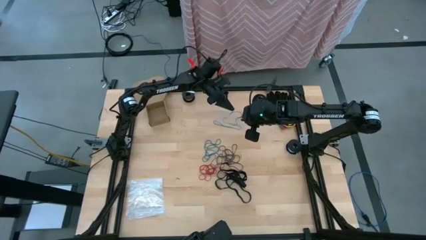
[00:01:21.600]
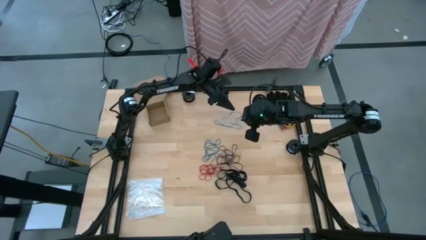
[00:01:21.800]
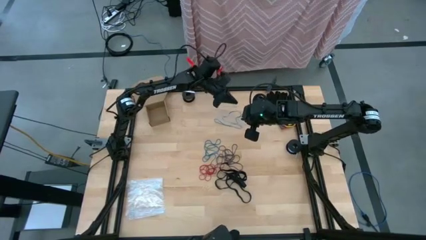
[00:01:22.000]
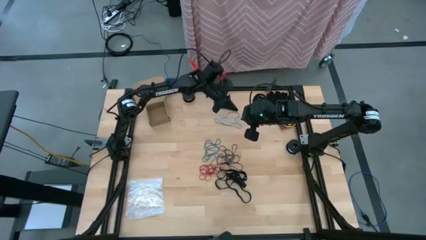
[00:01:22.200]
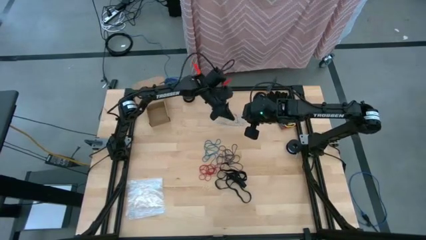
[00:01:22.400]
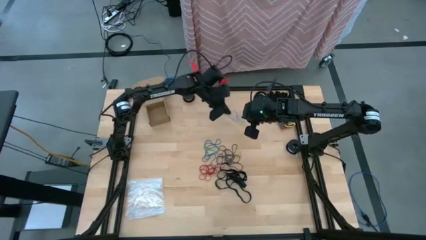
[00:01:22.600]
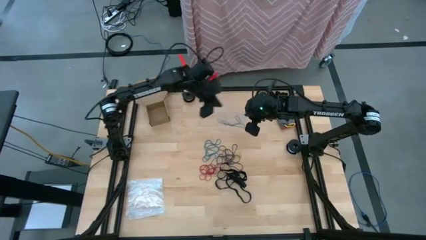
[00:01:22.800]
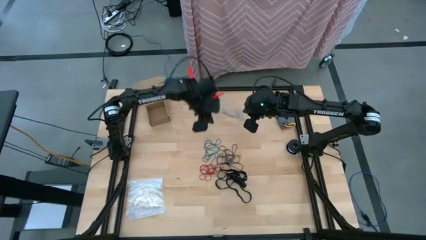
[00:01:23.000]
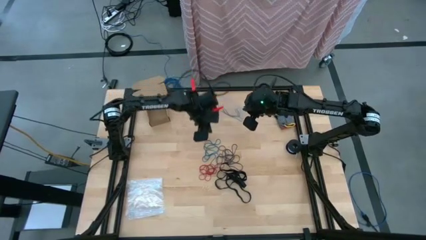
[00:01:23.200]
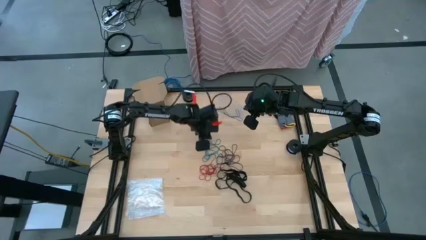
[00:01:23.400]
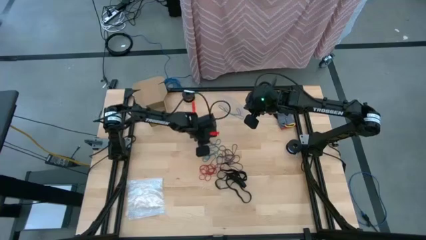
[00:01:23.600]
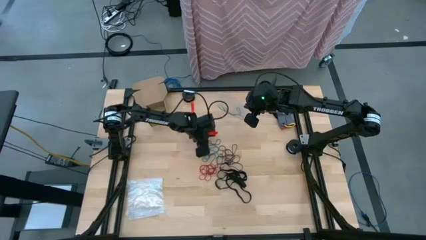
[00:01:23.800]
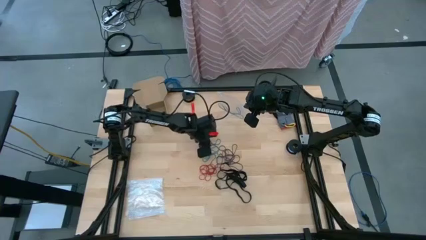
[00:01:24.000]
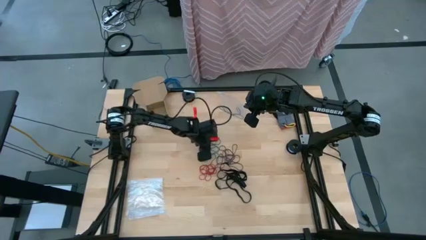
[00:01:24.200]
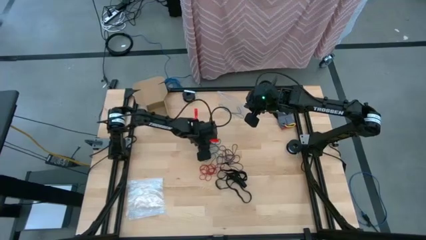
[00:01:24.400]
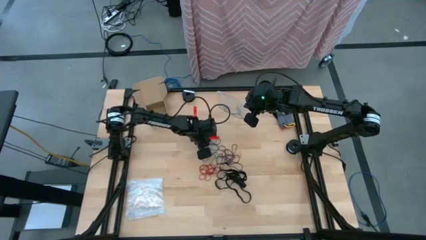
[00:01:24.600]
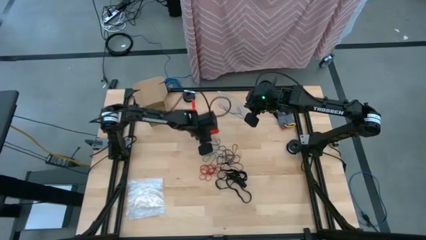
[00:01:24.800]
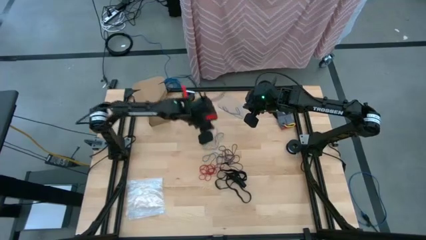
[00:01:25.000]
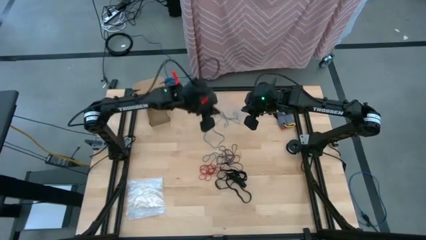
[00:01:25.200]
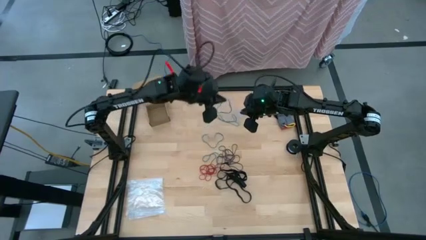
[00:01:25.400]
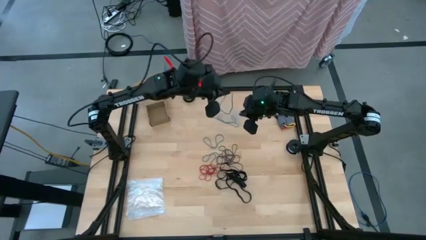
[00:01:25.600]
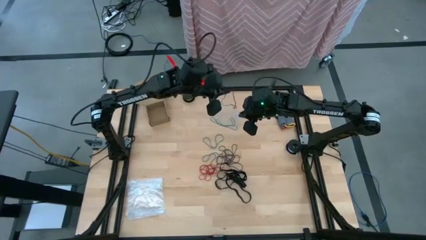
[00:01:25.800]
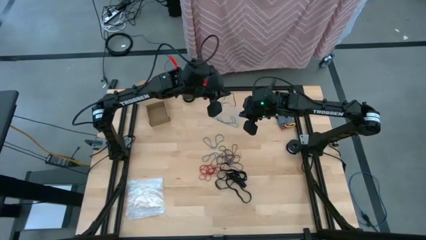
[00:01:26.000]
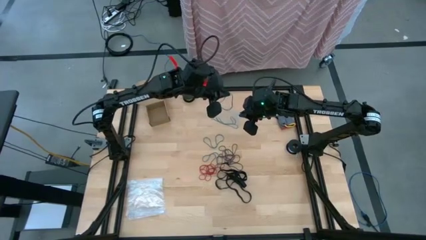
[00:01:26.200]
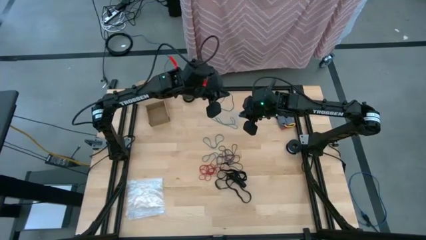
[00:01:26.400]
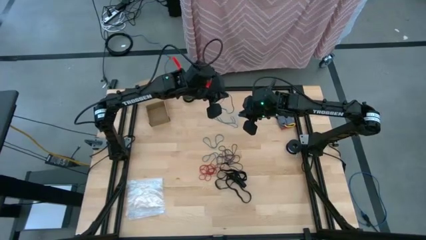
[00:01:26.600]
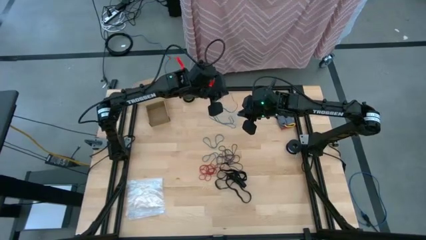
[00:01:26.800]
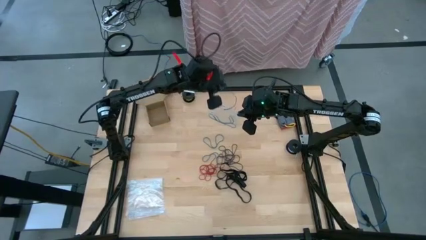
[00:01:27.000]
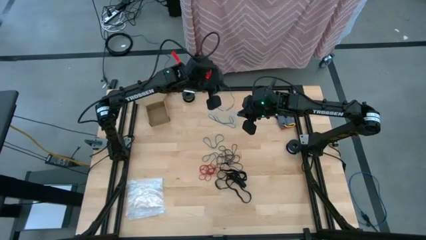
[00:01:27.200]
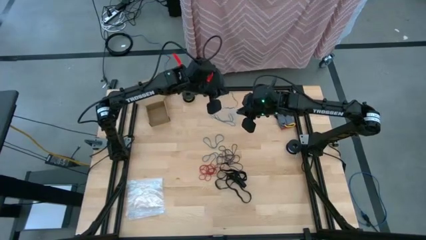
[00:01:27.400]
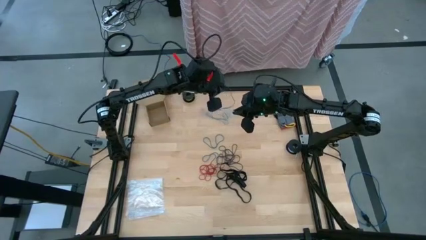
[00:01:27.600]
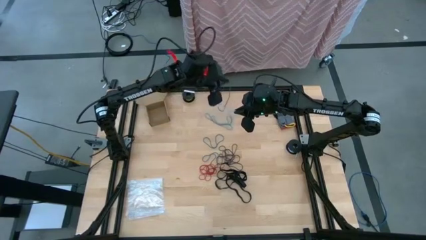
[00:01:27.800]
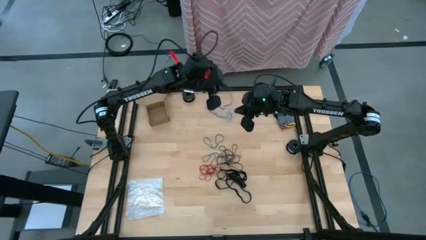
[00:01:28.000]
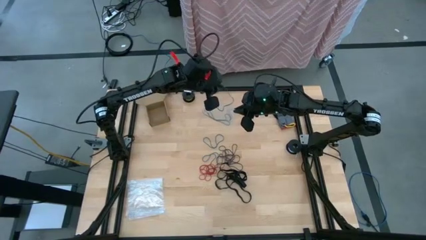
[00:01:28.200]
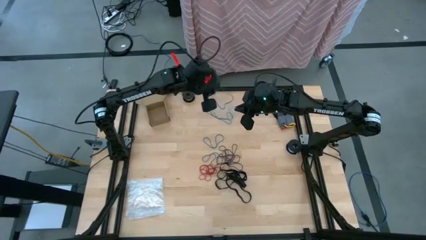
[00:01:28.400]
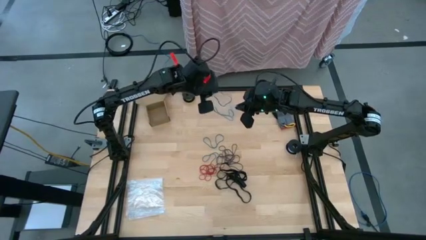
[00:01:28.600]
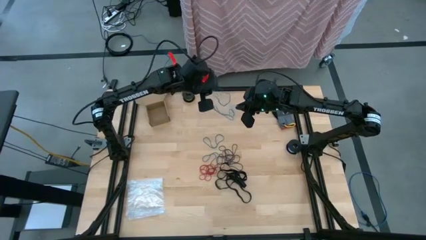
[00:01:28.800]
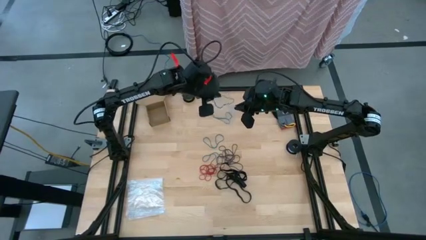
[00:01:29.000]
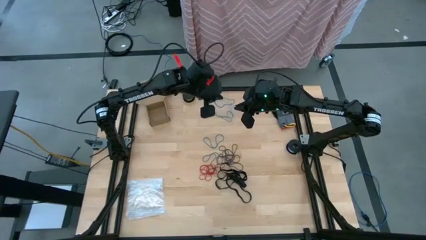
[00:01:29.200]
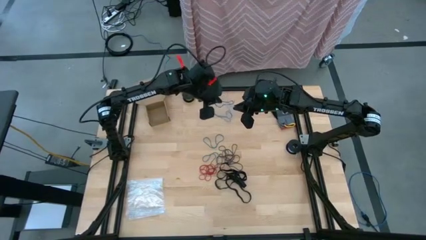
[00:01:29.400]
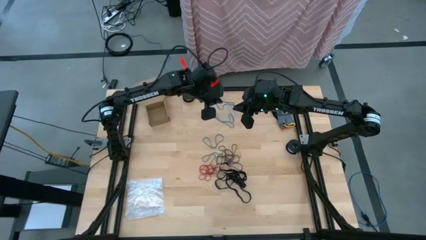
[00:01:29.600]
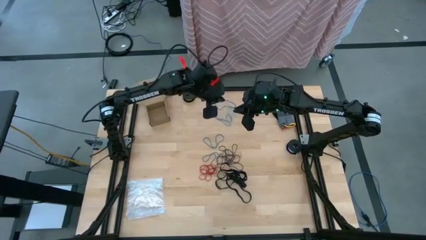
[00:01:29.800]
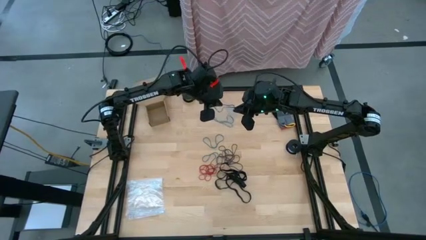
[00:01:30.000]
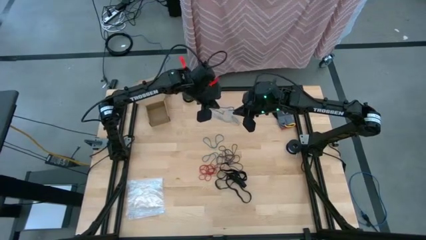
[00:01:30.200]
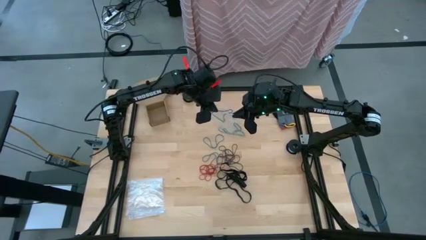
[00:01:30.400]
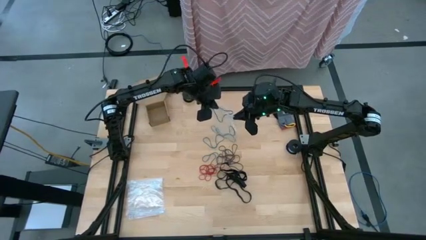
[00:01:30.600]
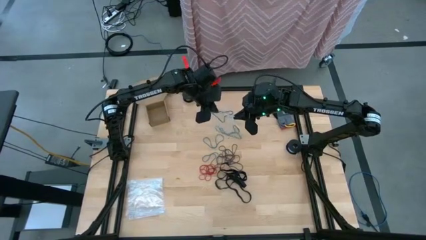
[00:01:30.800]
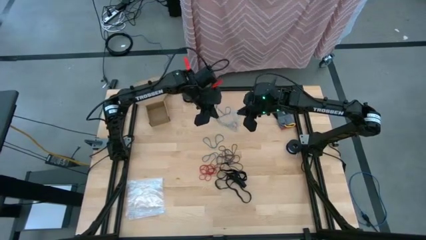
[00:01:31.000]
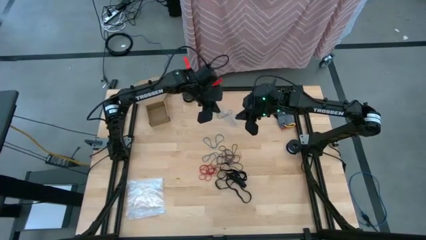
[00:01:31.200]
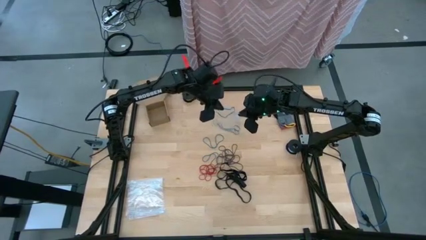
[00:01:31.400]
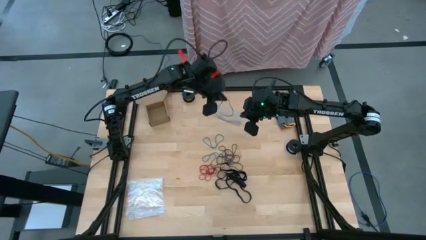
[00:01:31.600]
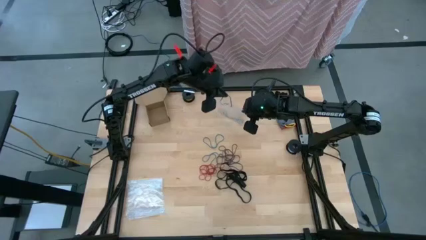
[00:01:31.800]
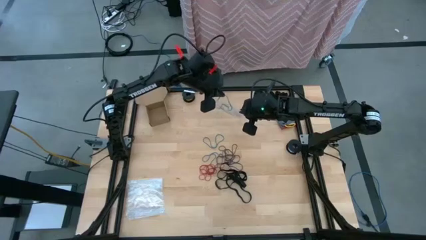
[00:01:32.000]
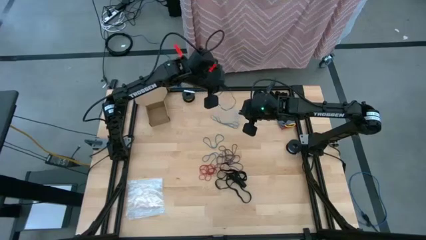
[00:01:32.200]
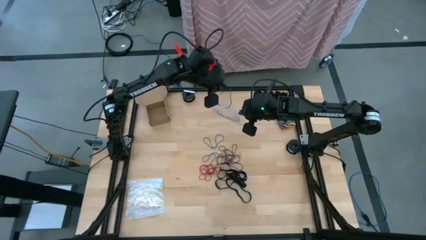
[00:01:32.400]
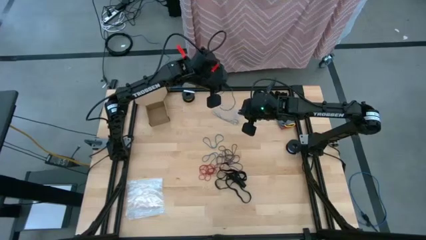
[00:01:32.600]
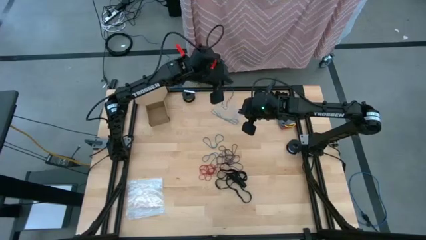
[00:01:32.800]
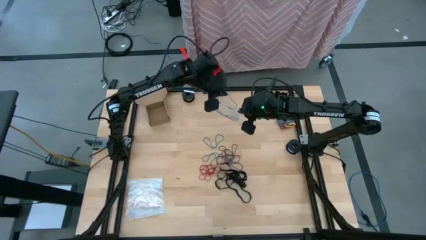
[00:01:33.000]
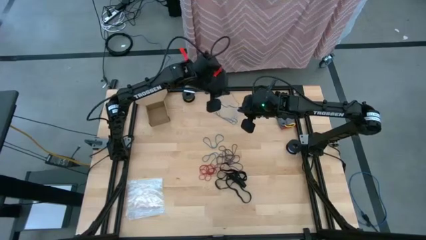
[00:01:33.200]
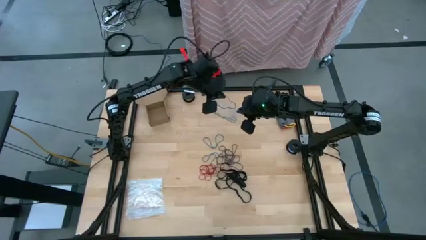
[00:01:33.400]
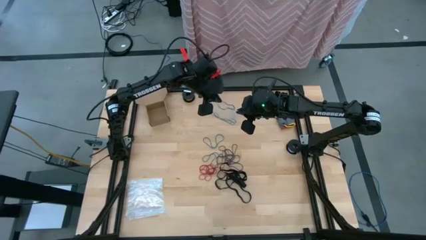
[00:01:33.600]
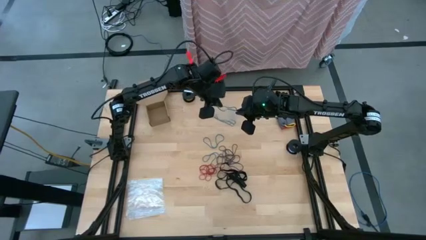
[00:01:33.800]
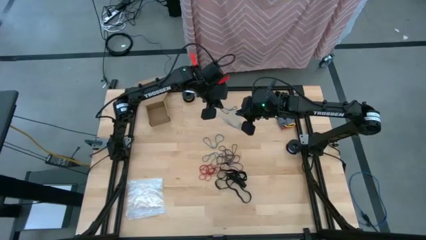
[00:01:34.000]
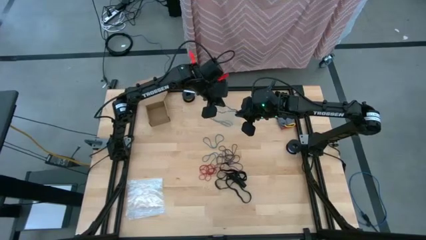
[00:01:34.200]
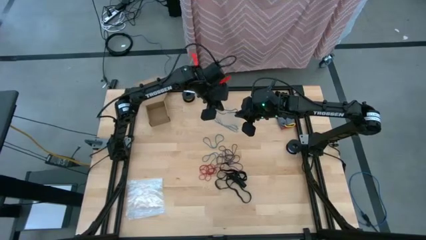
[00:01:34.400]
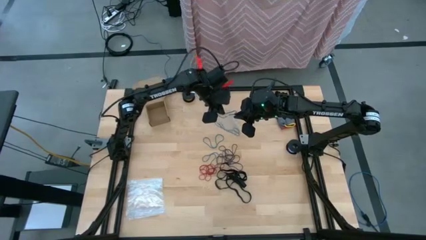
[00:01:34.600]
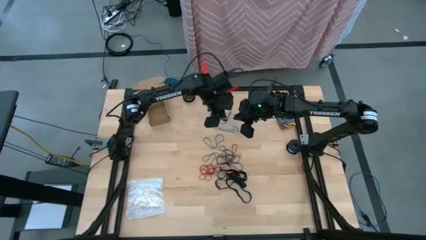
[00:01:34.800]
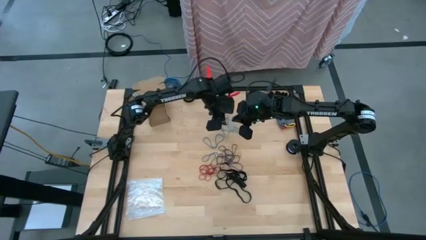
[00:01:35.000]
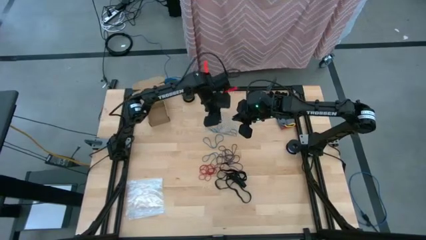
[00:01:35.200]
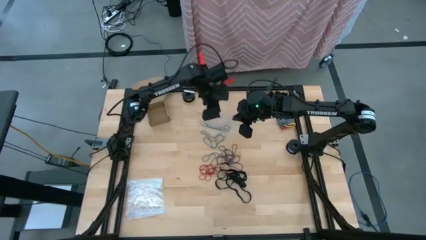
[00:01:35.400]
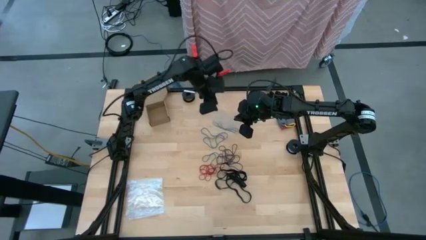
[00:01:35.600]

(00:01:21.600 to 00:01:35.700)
Task: Sort rubber bands
Put the blue rubber band into the transparent zip bag
